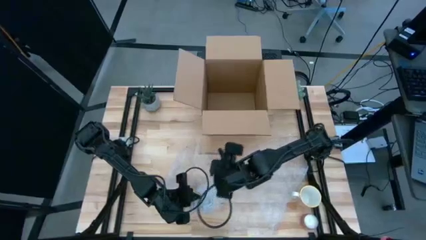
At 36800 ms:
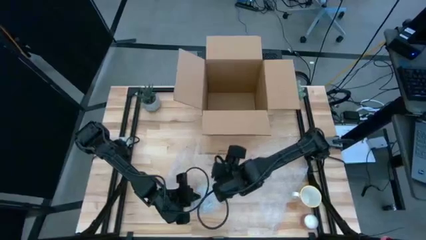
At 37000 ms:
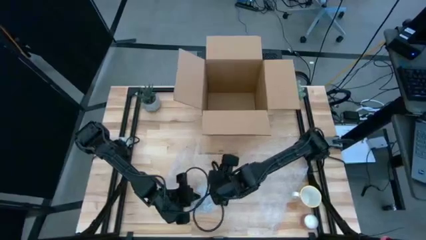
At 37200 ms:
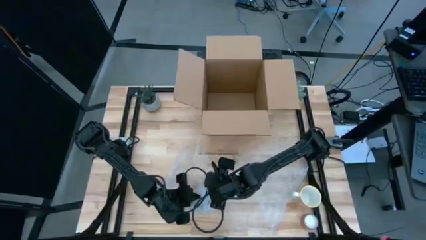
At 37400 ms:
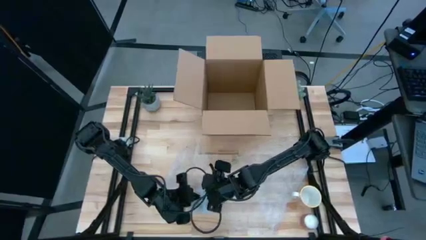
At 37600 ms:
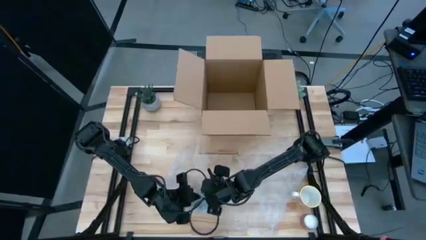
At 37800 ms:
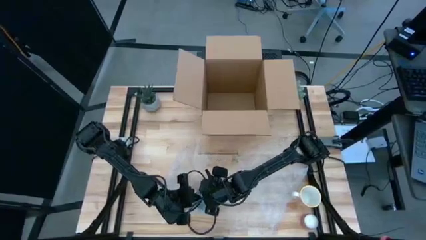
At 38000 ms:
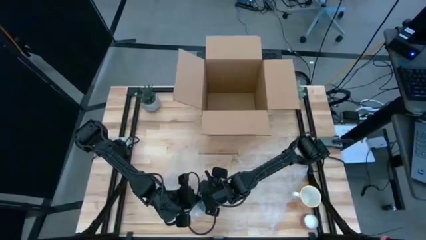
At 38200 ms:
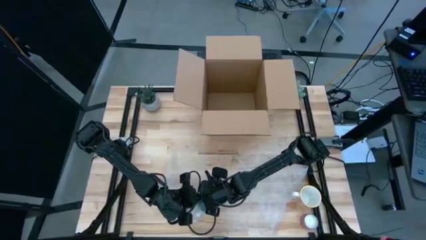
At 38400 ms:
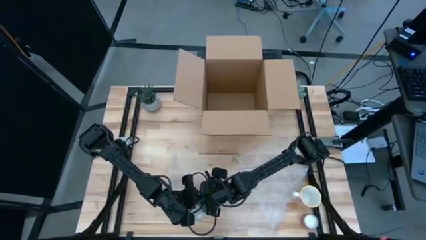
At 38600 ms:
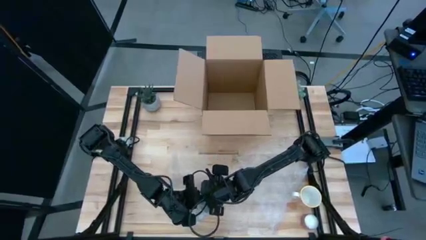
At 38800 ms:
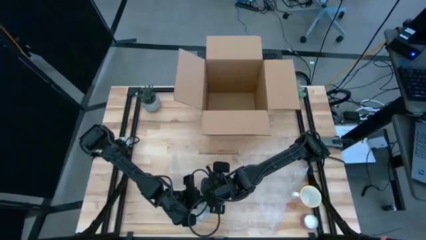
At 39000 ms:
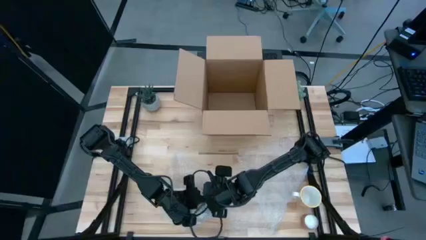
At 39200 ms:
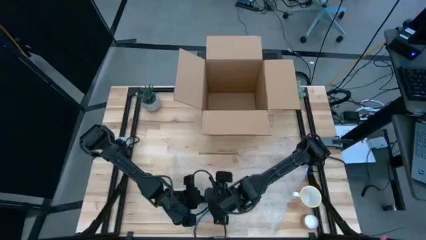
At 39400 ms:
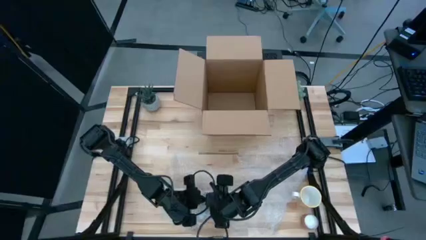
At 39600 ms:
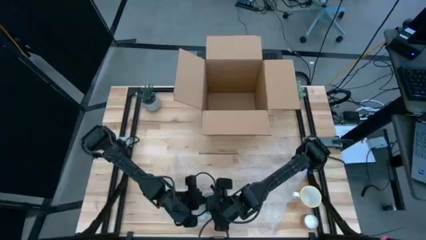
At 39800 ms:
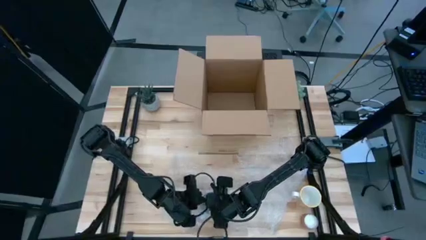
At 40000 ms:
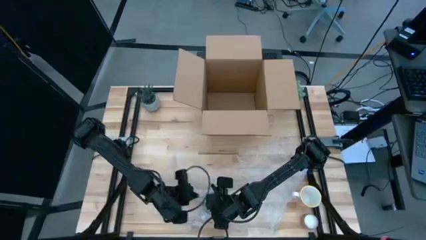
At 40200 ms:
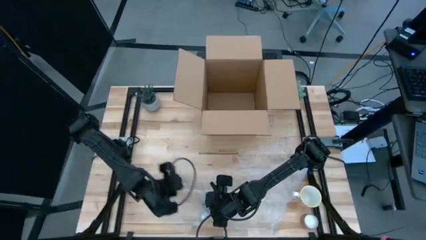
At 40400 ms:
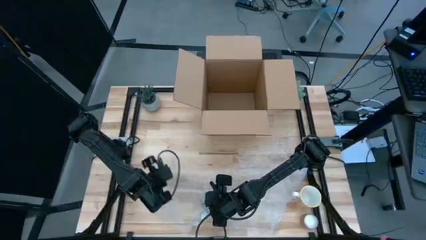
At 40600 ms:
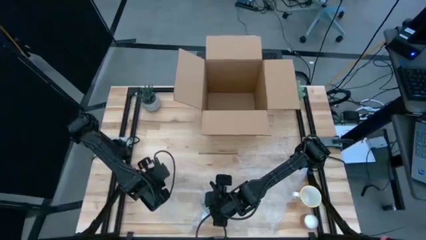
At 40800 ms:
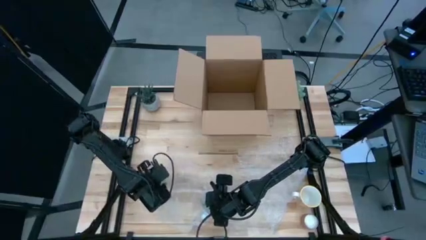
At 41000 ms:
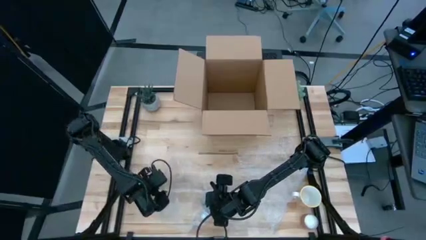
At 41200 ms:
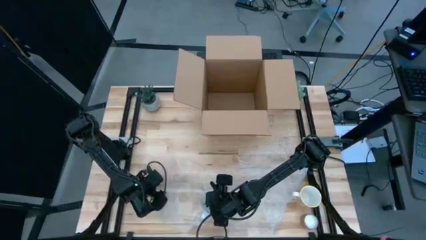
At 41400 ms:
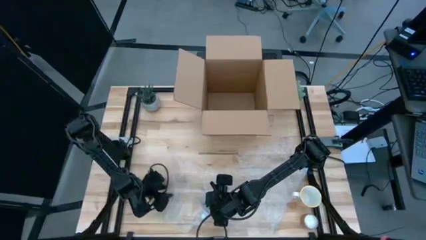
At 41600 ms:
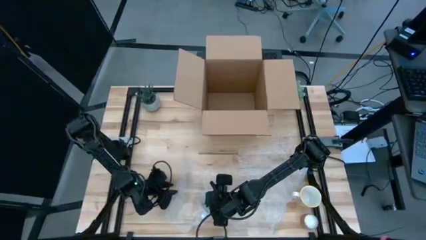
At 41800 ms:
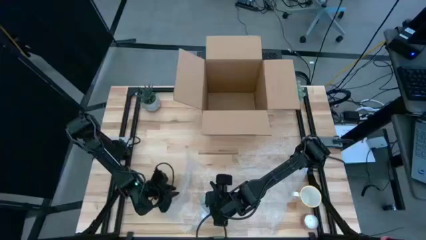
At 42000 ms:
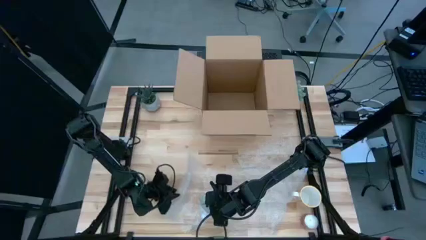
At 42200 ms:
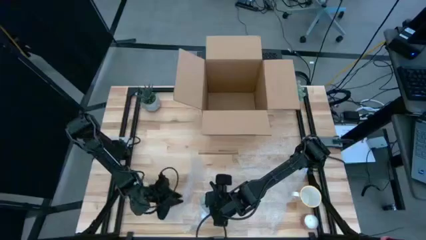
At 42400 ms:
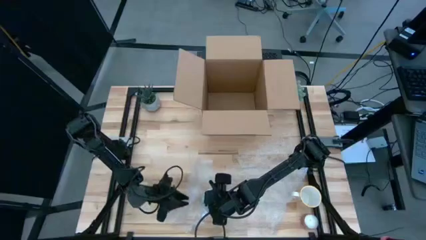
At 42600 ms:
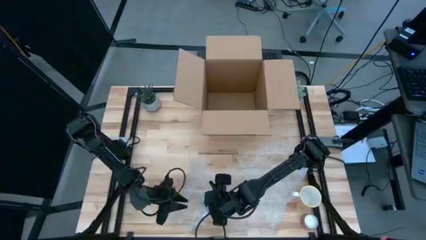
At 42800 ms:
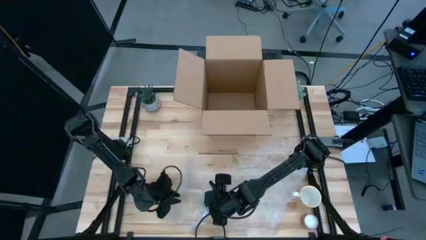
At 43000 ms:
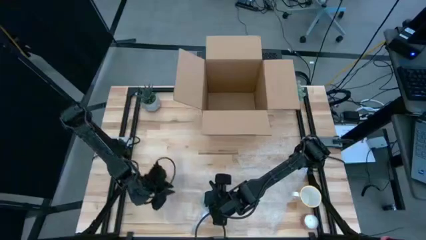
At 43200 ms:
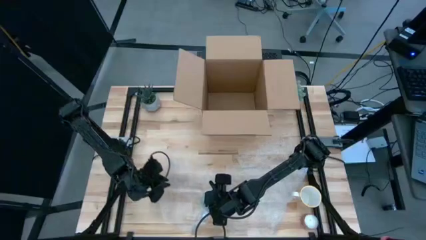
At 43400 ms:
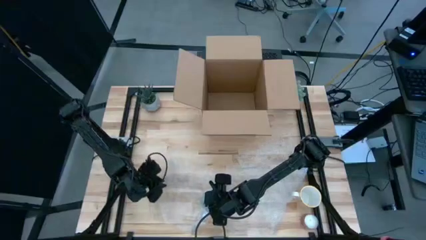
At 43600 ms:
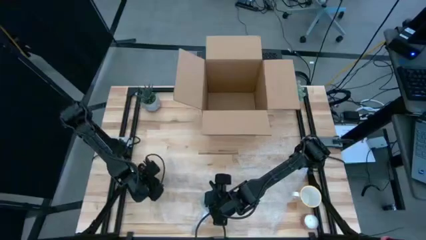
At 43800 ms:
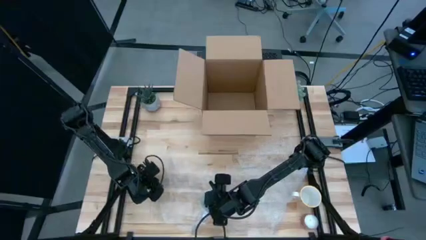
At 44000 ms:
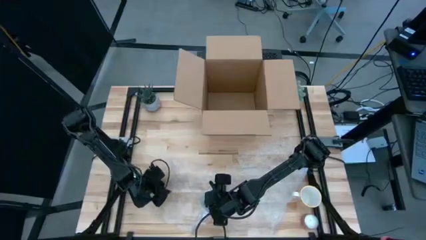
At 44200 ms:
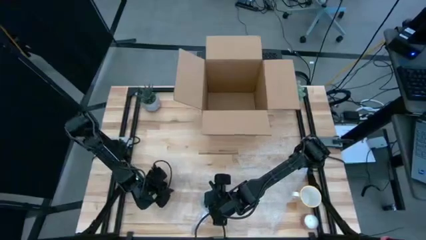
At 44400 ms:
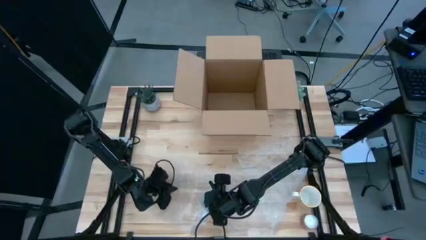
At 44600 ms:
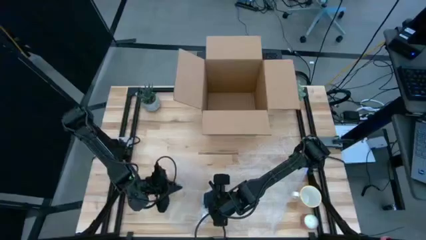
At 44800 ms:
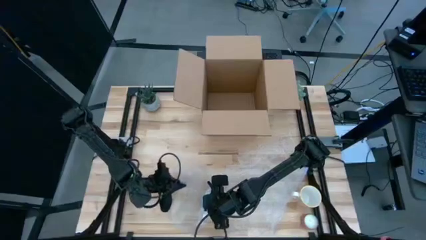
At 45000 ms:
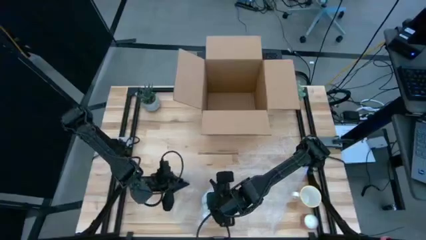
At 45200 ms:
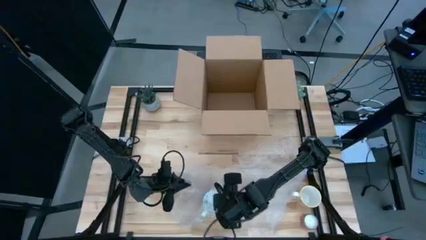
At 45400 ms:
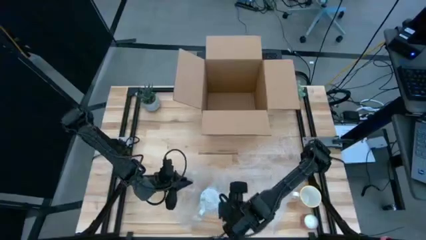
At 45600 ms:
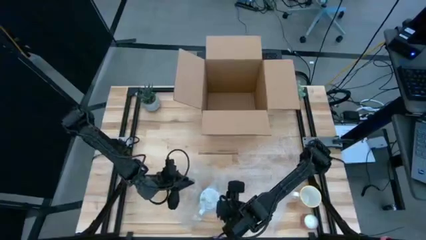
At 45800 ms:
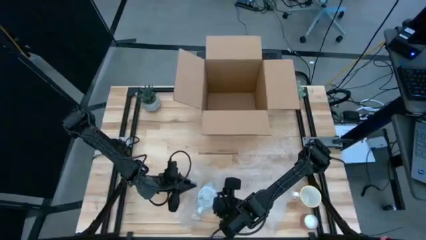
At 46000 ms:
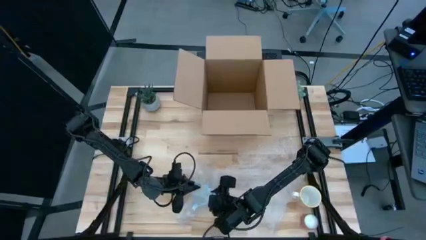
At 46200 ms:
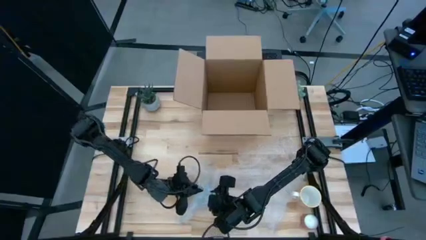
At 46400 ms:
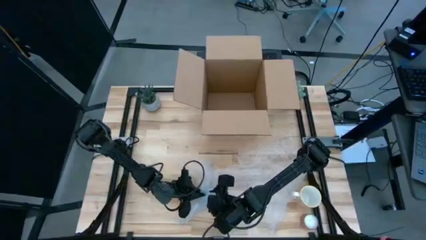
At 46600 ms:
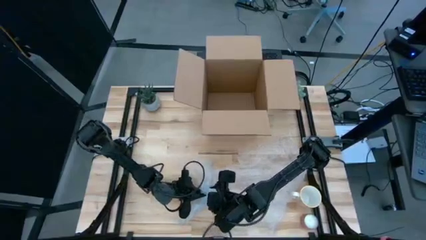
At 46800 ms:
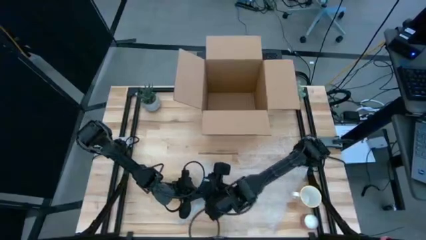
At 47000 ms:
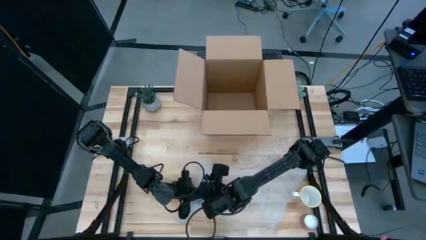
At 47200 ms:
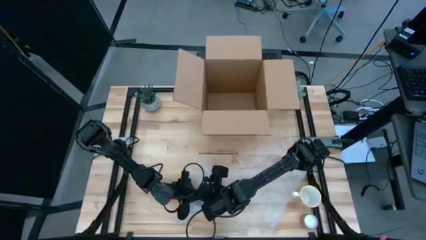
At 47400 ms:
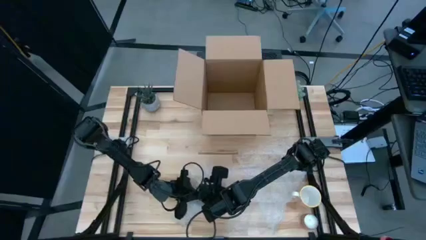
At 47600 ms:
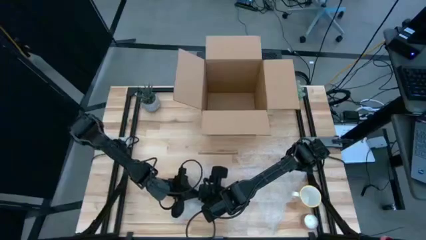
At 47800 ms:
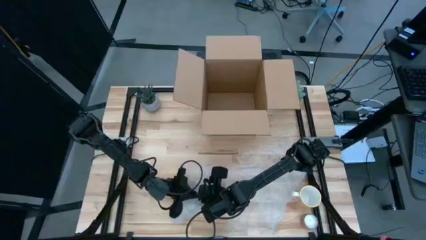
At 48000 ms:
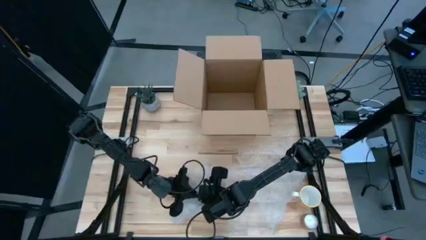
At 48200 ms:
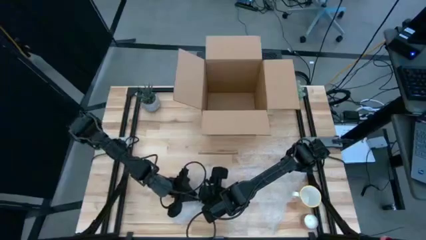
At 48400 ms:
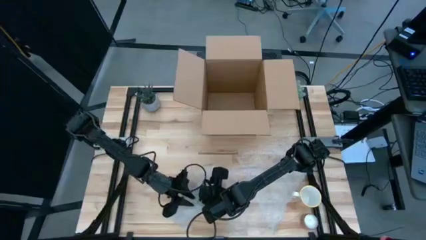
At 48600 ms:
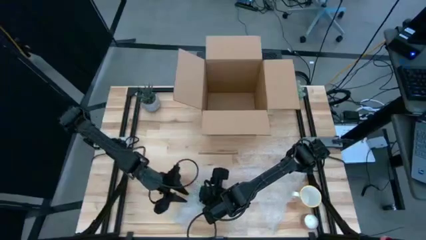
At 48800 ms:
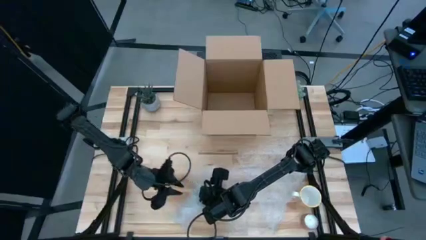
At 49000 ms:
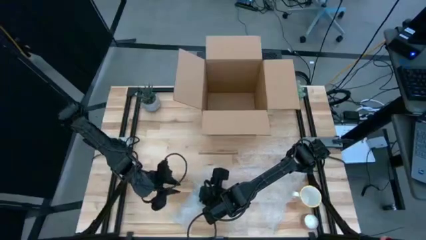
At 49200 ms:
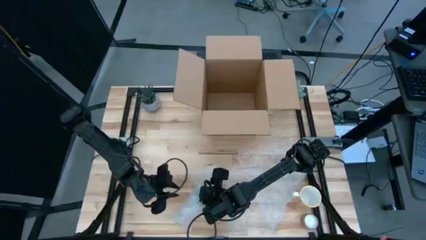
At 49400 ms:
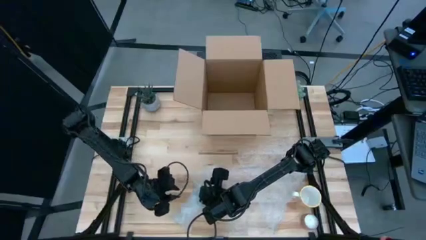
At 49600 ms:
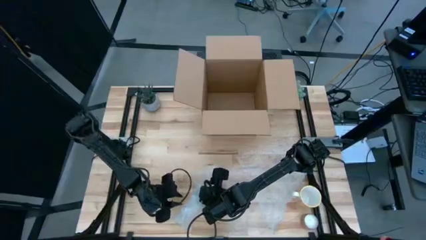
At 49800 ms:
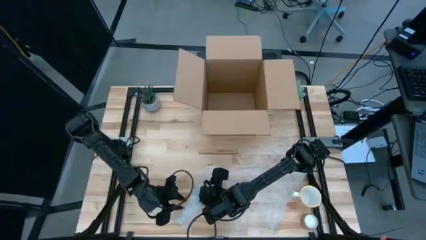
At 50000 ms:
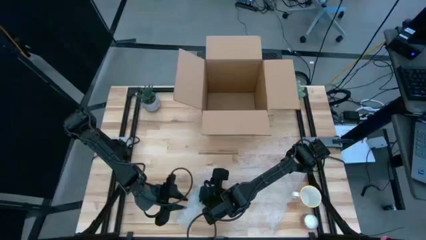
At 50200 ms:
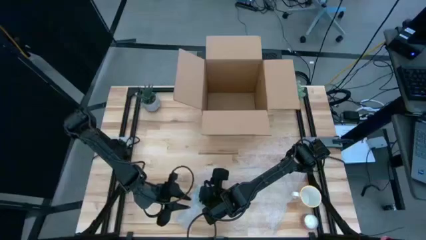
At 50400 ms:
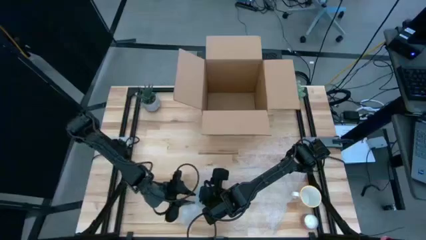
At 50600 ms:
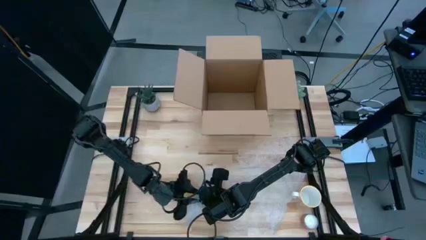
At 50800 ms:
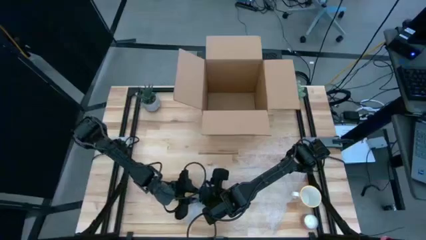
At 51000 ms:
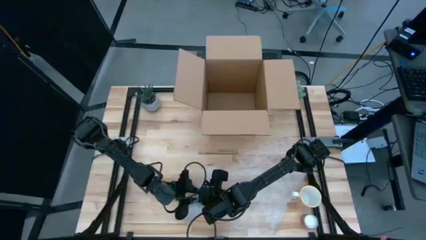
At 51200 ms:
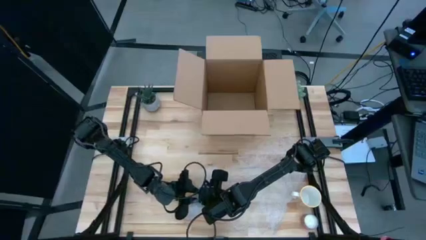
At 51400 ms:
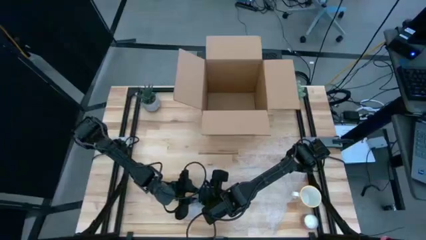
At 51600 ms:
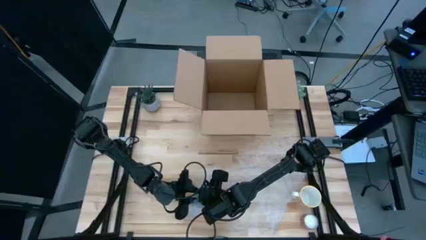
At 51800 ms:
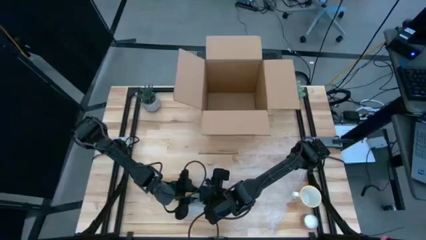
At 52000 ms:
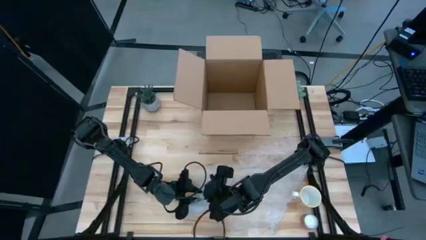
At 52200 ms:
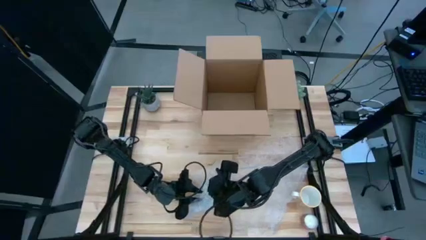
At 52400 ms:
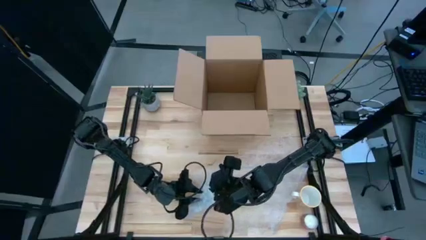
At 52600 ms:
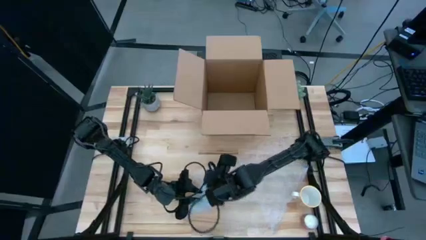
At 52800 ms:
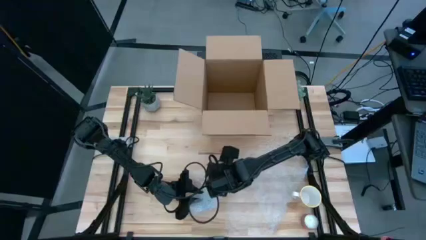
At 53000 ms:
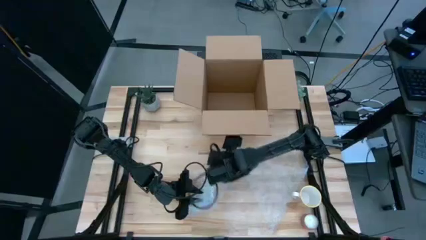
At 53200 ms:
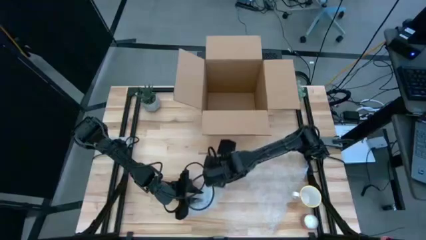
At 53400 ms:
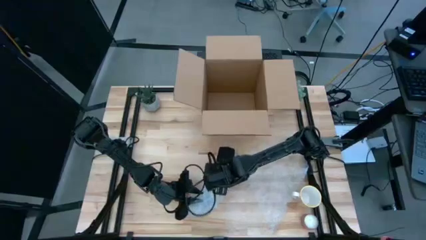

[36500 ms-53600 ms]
Task: wrap mug
Wrap the red patterned mug with the left transparent bubble wrap
